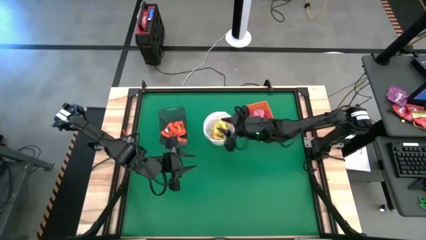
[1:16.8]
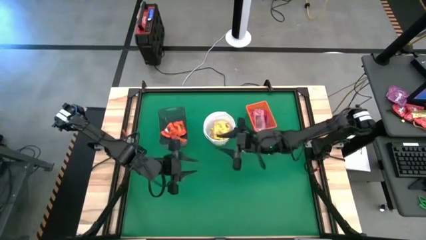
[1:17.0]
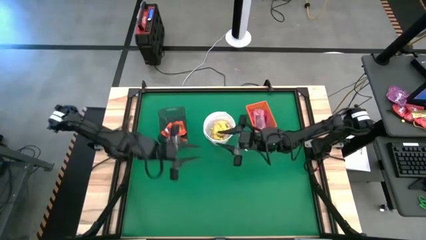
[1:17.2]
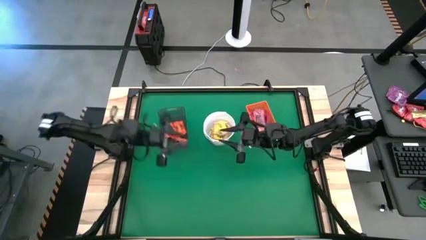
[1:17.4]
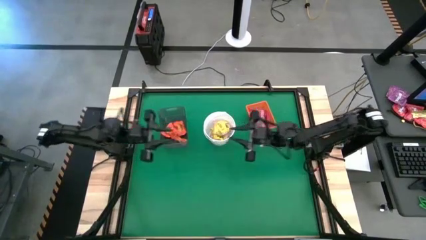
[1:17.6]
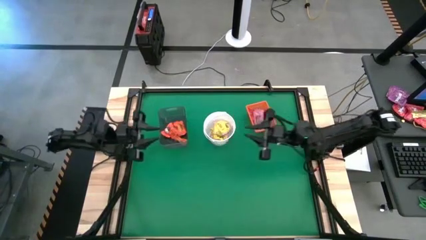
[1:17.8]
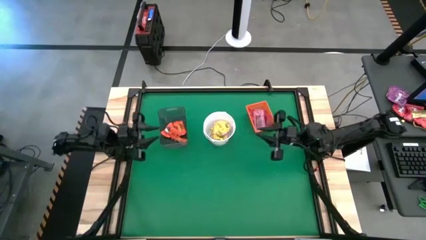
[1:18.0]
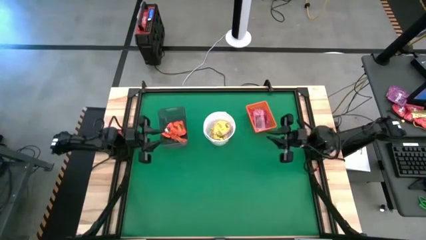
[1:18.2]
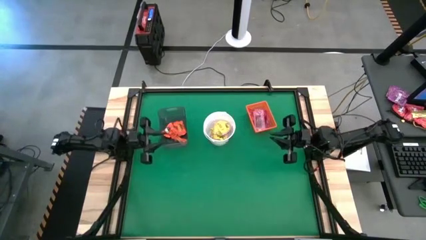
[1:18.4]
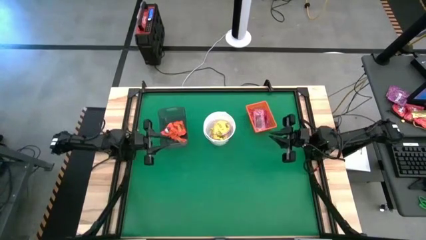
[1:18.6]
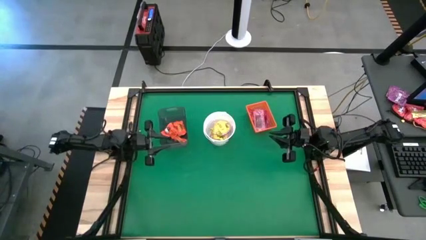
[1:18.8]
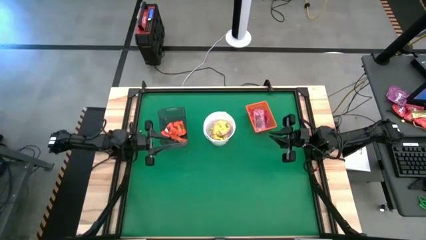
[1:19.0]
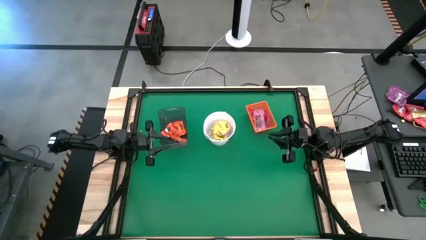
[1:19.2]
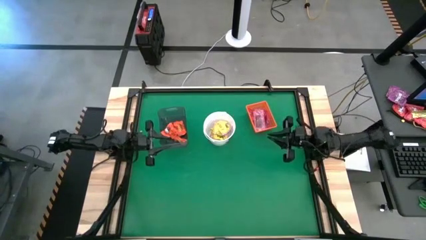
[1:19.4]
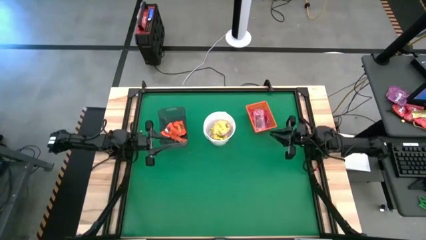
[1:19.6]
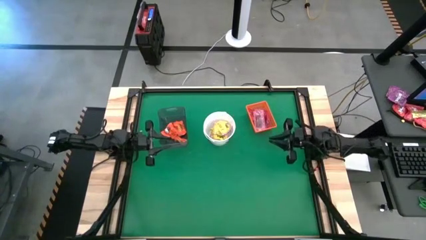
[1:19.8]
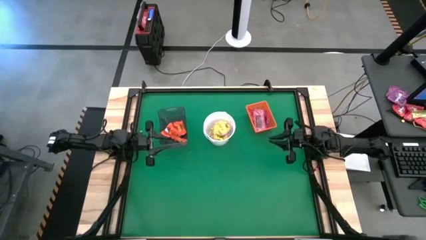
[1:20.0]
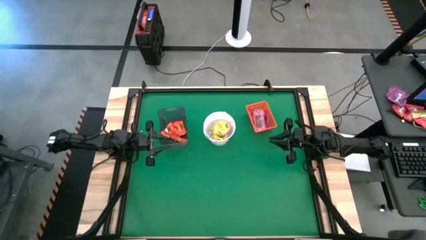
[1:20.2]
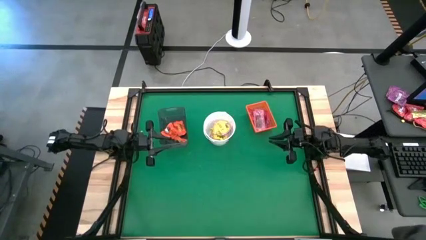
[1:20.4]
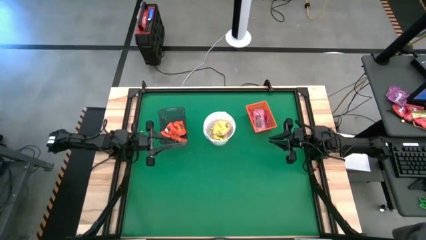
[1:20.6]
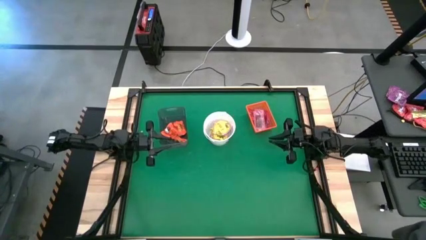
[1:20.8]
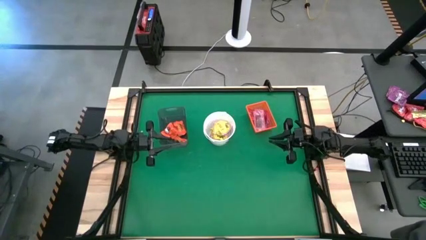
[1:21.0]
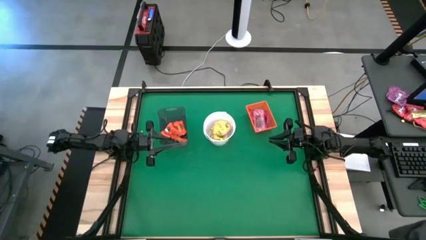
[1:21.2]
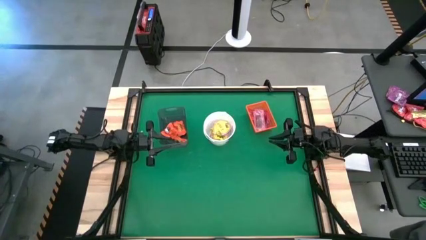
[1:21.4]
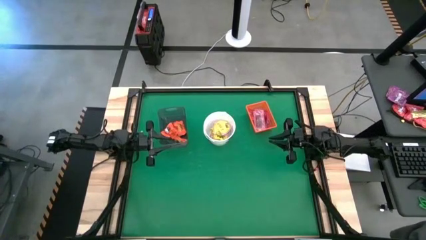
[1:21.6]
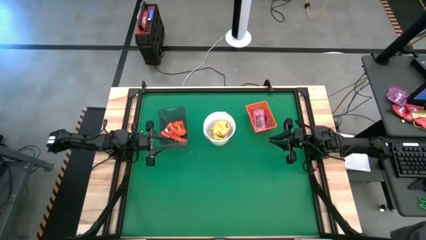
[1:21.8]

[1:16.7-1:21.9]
Task: Sort candy by brand, put in halloween buckets
Return to Home Position

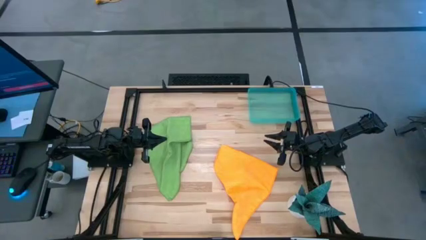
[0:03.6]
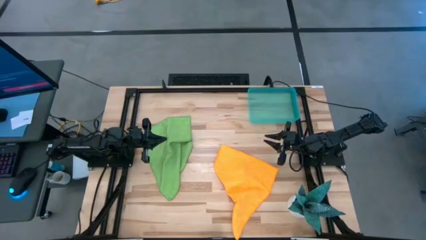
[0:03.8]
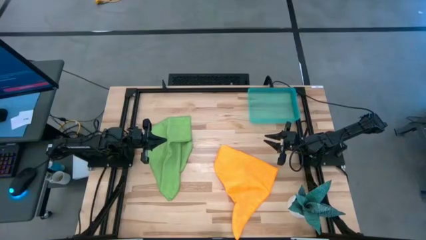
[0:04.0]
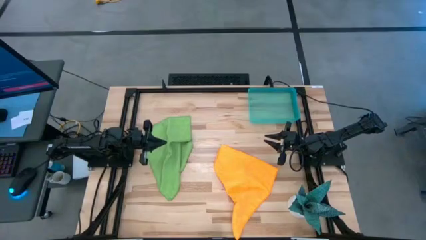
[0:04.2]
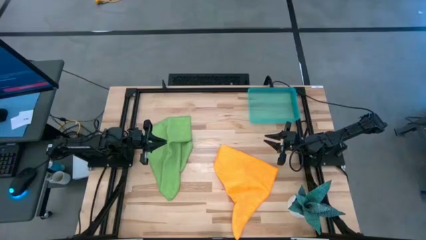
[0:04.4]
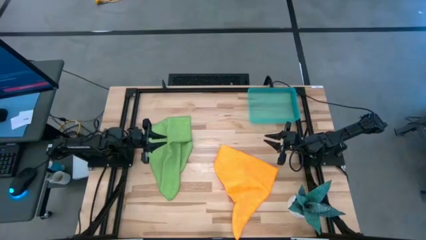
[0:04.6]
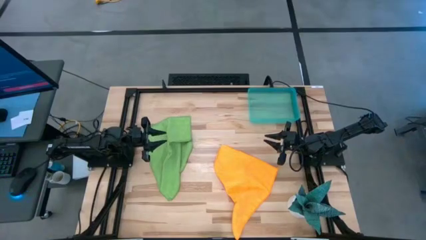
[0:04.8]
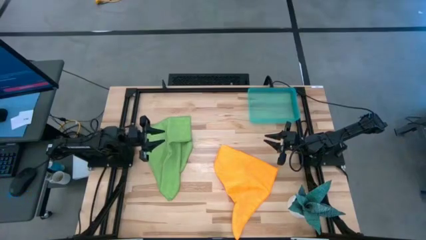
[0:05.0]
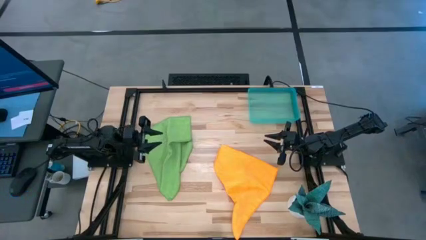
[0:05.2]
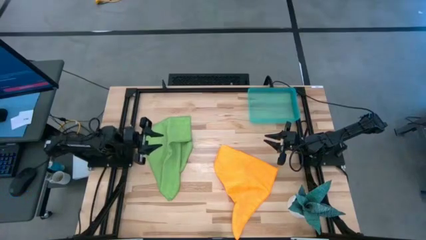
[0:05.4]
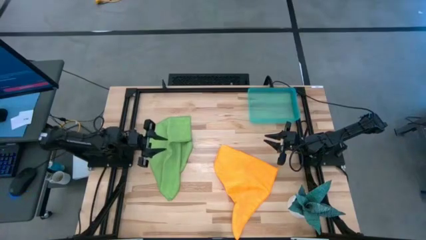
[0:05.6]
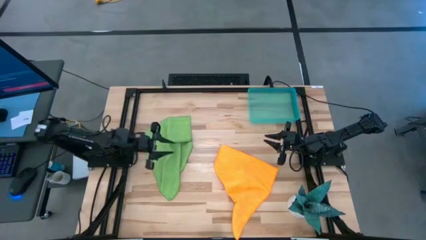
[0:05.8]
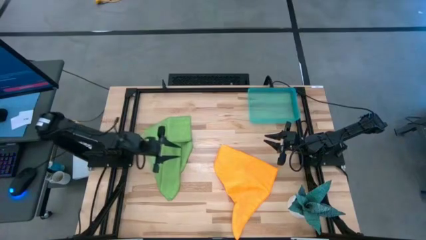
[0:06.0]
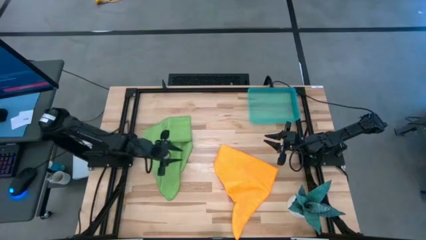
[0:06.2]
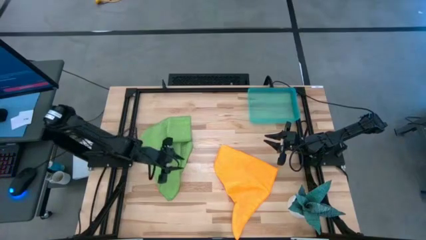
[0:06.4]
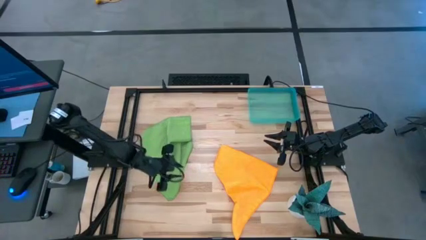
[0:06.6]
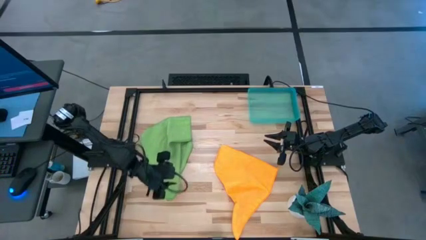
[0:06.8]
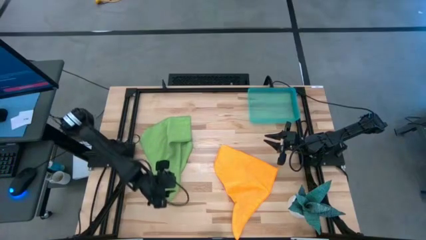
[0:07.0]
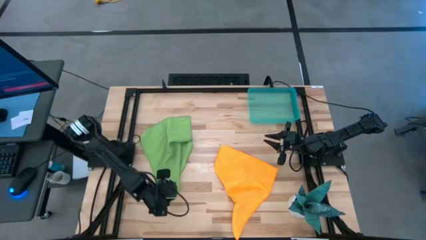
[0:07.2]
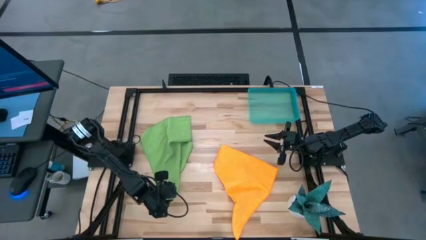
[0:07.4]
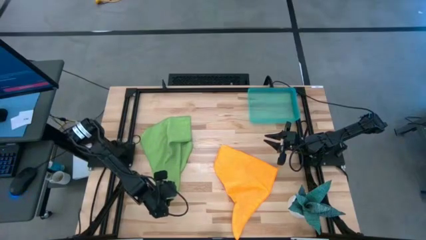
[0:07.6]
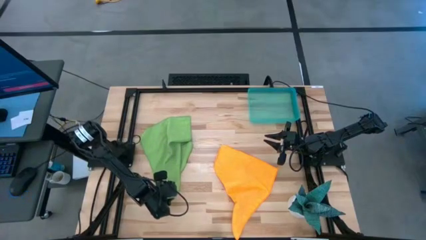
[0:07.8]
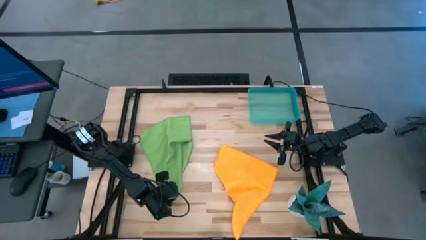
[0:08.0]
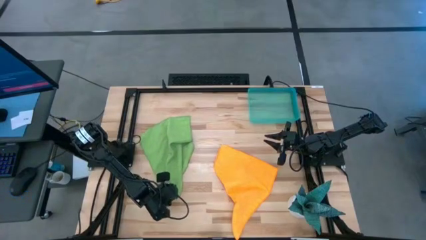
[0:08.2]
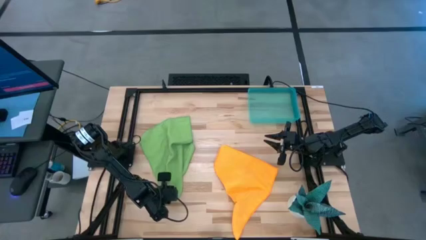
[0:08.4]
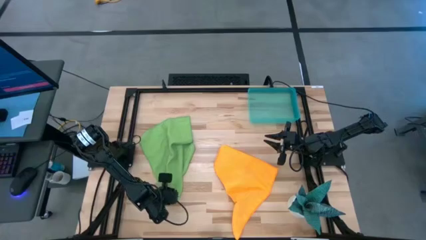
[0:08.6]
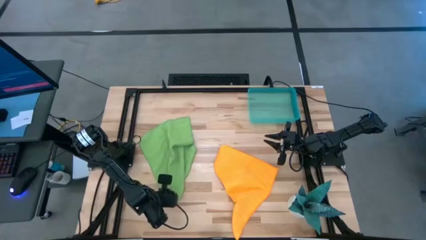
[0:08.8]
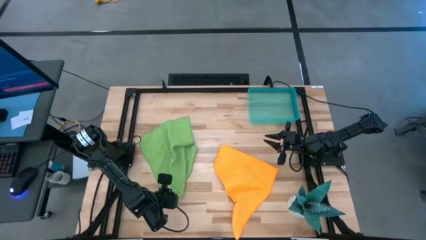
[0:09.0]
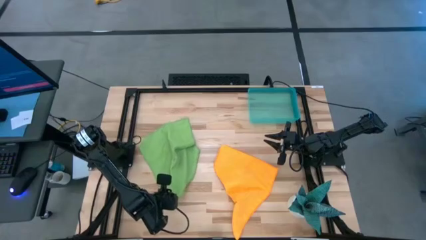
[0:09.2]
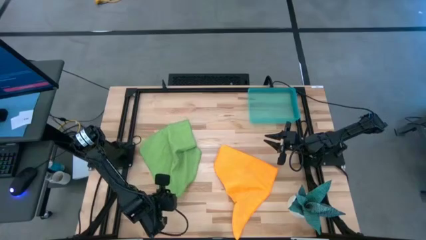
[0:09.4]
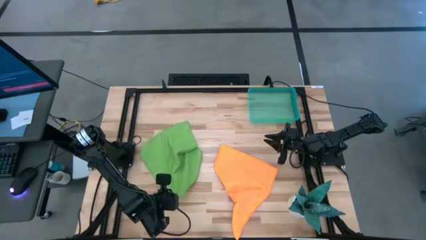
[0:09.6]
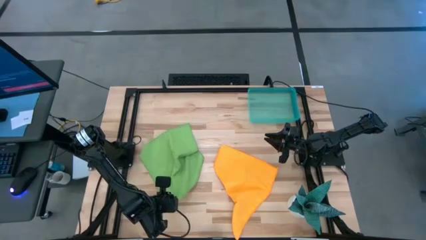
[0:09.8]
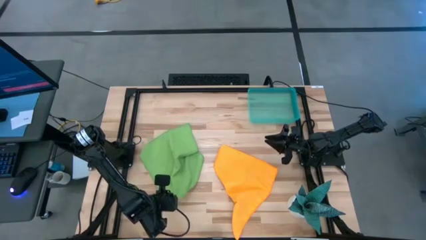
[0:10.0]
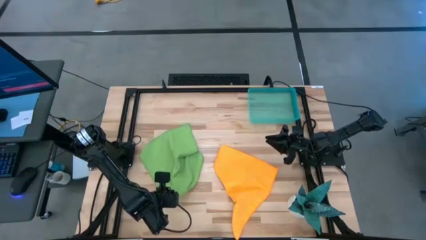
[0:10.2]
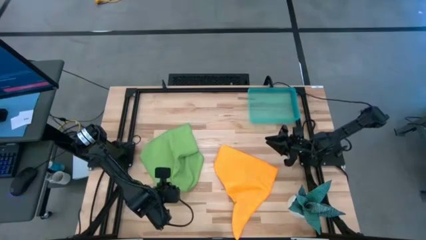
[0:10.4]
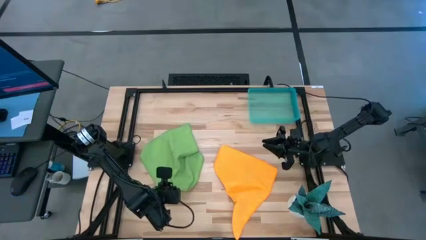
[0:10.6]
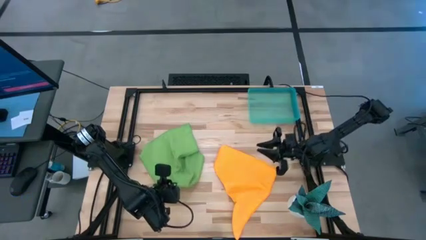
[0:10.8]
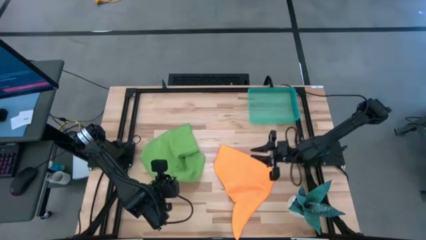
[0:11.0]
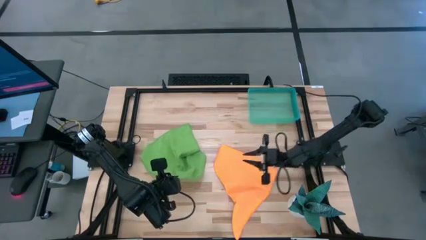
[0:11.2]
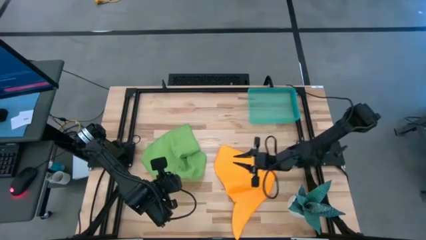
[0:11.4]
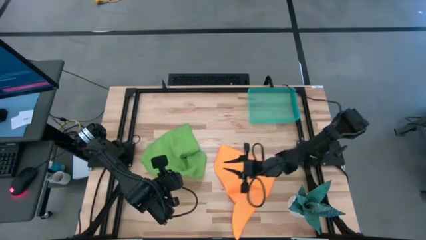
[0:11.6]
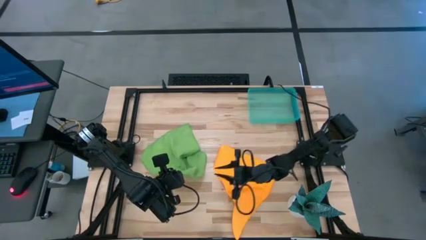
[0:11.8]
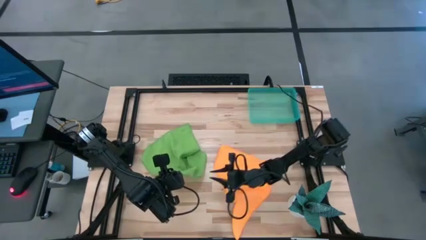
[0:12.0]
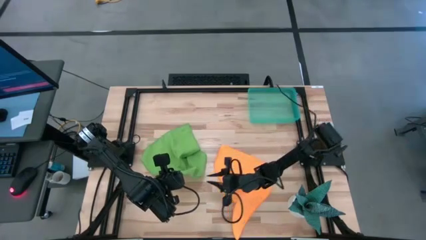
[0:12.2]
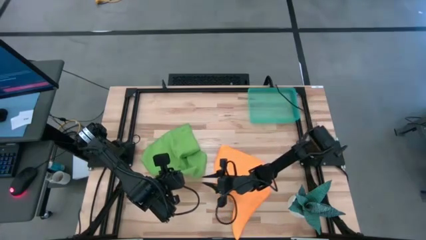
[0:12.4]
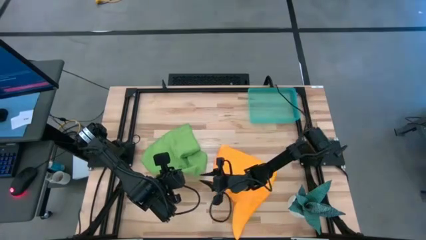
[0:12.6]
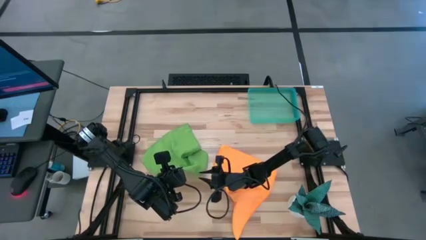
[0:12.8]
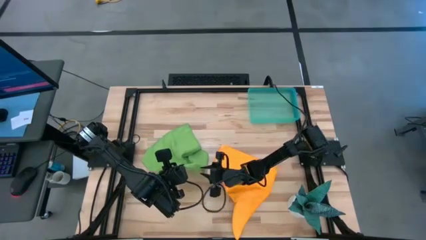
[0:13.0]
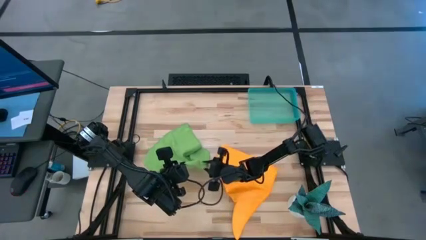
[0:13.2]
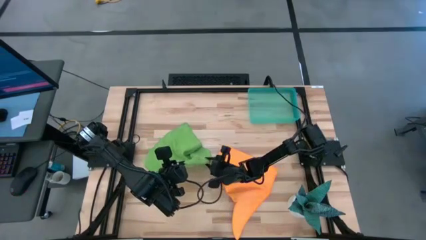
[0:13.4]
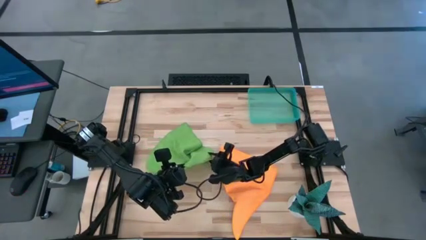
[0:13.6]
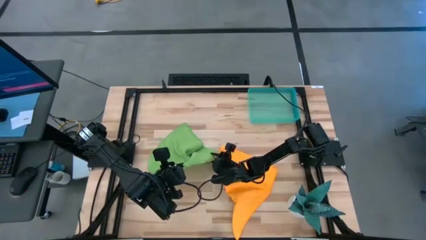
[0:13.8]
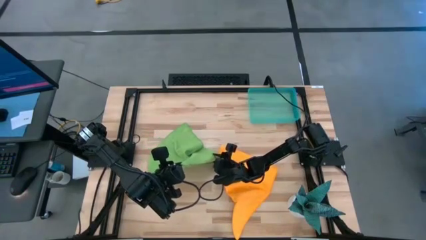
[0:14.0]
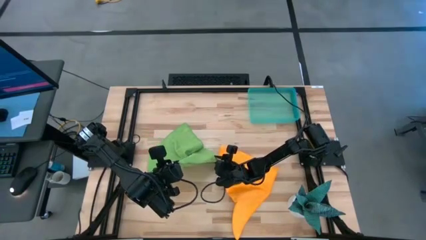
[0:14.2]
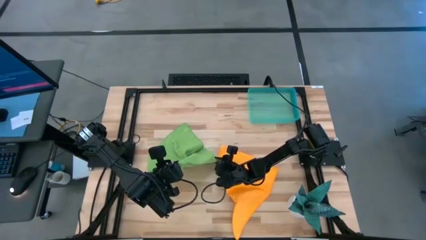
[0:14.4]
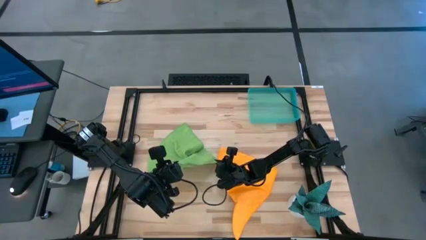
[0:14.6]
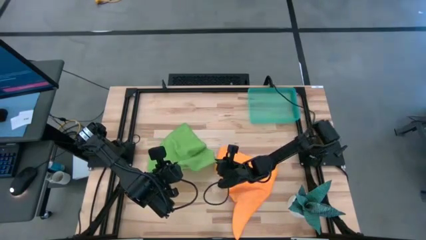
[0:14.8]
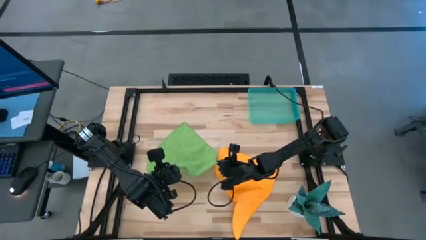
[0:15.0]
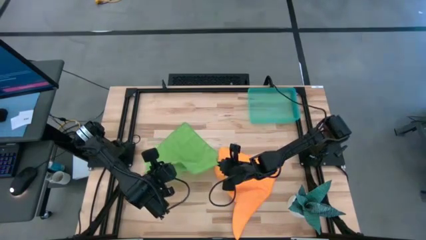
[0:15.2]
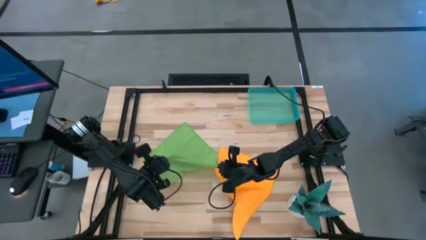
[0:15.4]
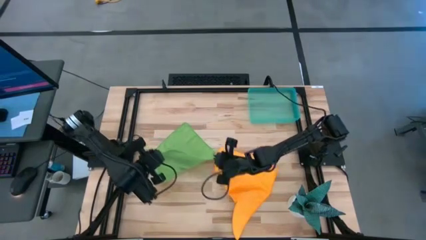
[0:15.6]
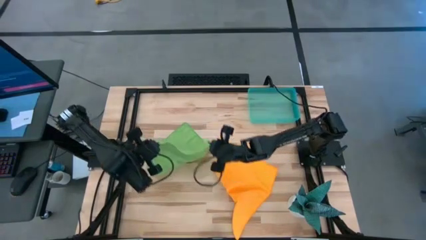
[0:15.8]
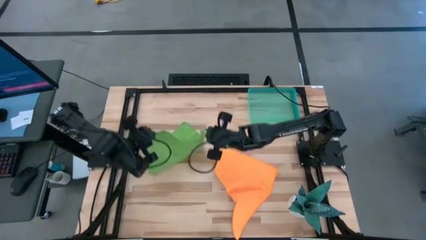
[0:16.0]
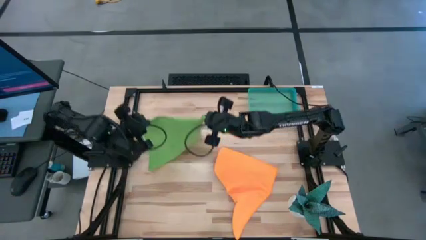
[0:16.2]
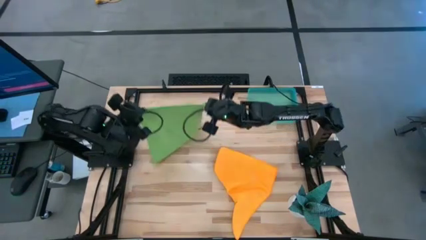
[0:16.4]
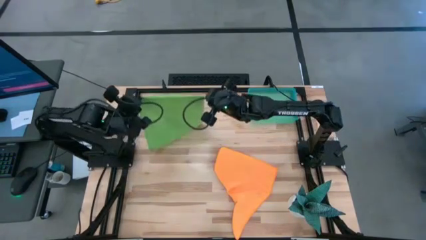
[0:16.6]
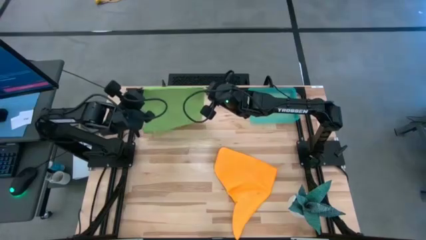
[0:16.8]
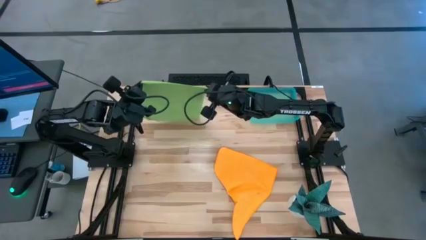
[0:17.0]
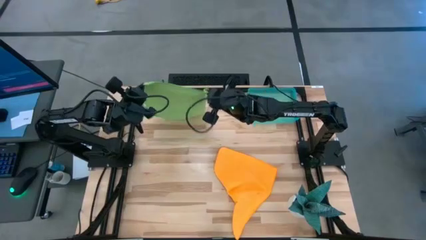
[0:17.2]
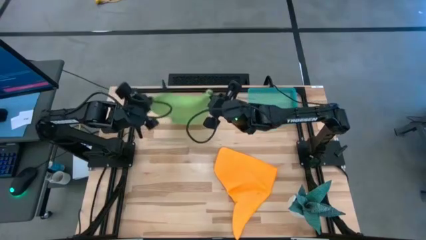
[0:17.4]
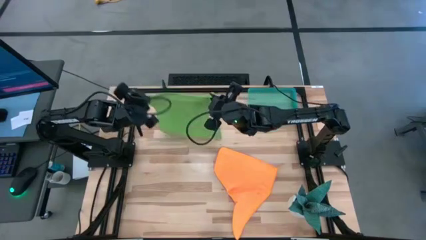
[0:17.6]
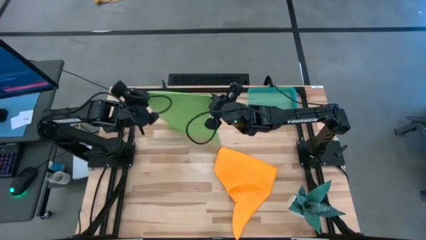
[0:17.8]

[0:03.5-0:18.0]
Task: Roll microfiber towels into tight, uniform cylinder then place into a basket
Fold the green microfiber towel
